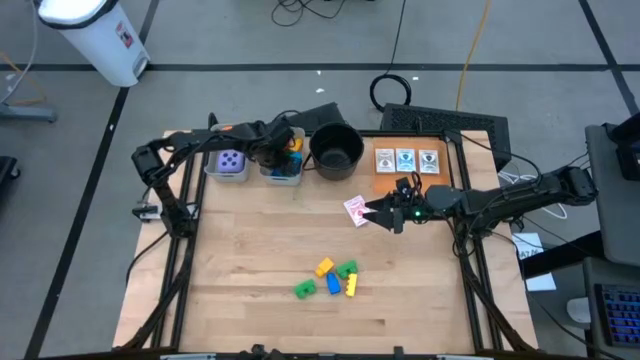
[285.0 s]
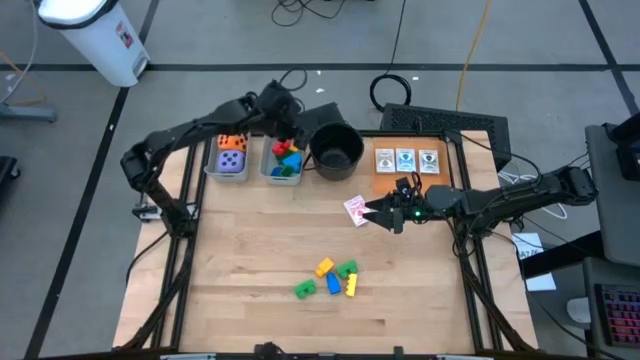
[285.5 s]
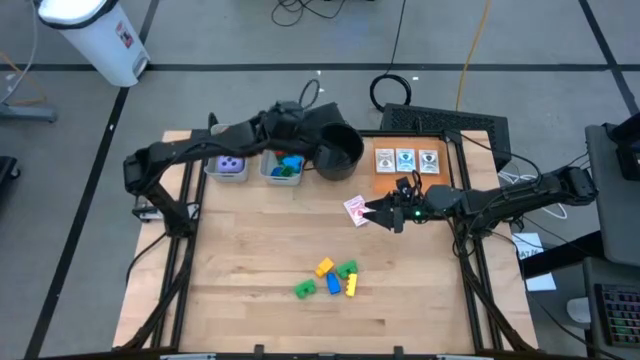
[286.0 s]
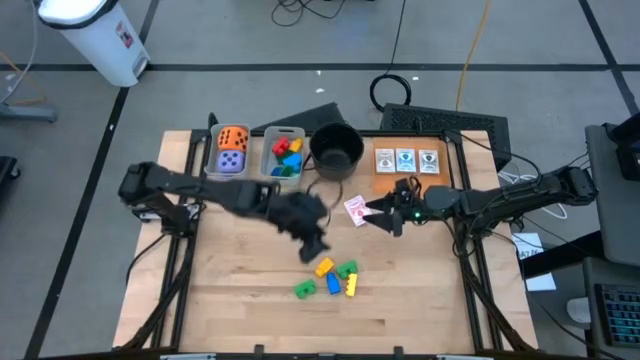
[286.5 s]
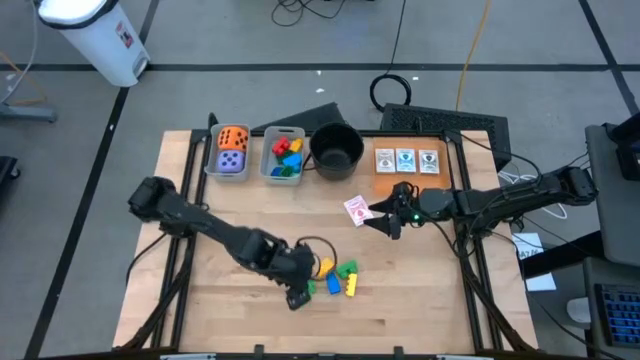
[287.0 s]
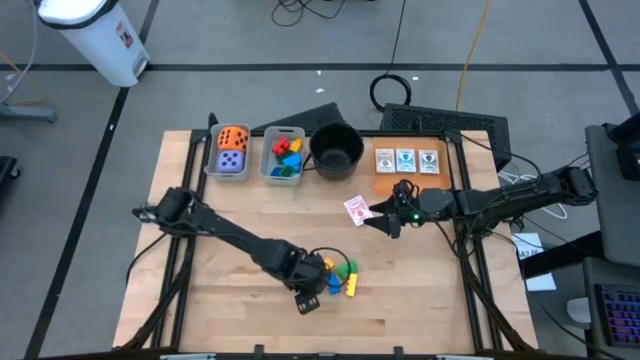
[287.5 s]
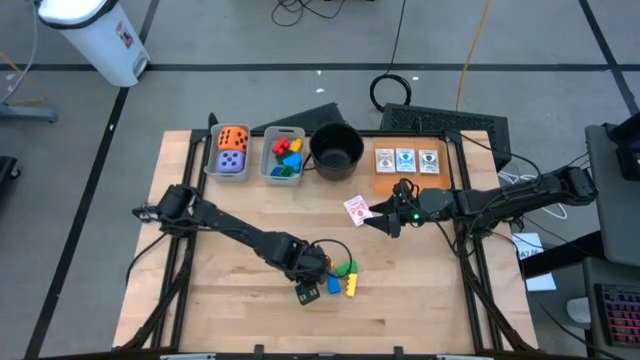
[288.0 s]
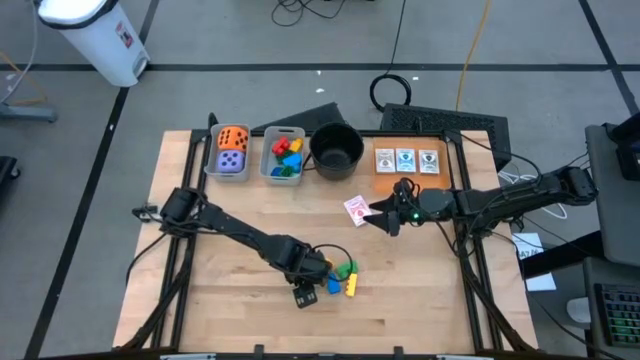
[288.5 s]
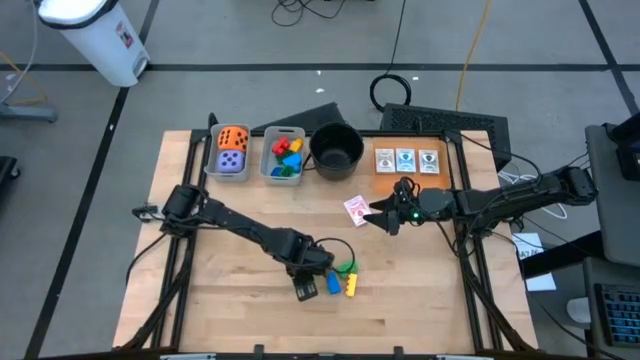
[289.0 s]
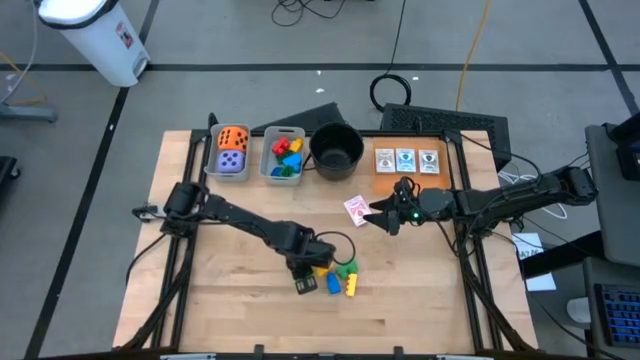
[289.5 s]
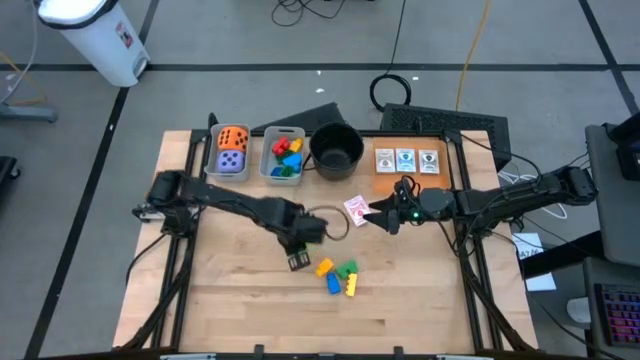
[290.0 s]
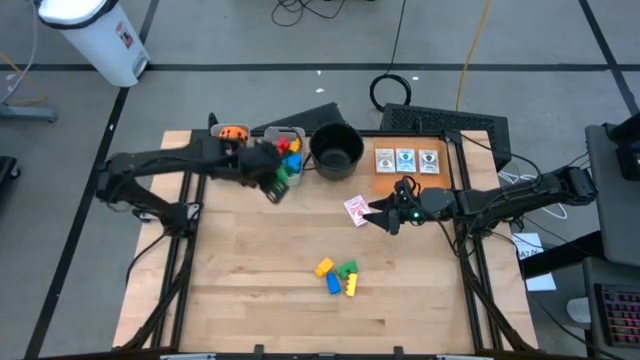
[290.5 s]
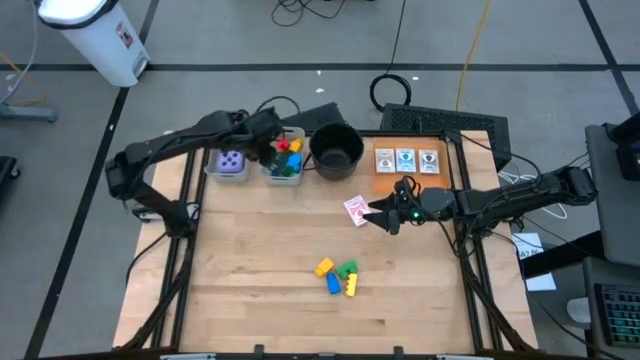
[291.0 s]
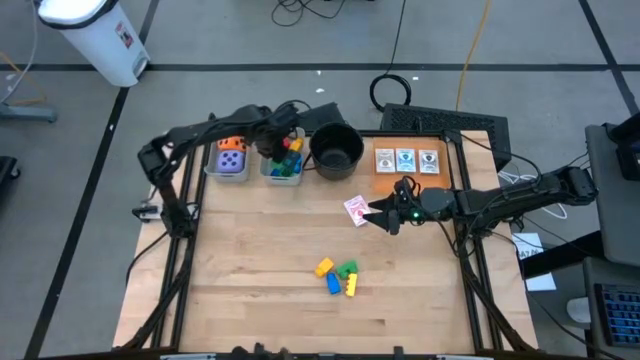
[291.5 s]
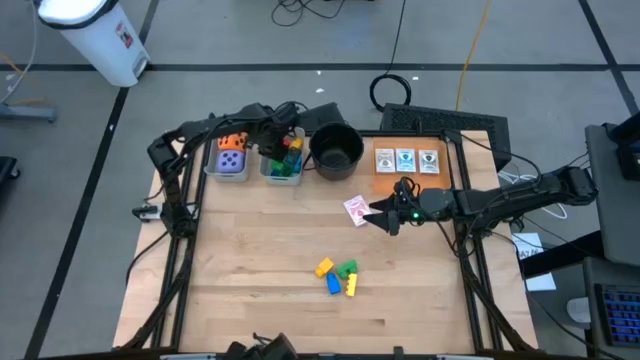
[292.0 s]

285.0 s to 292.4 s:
Task: Pick & Place Toys
Put the green game piece into the right gray bin

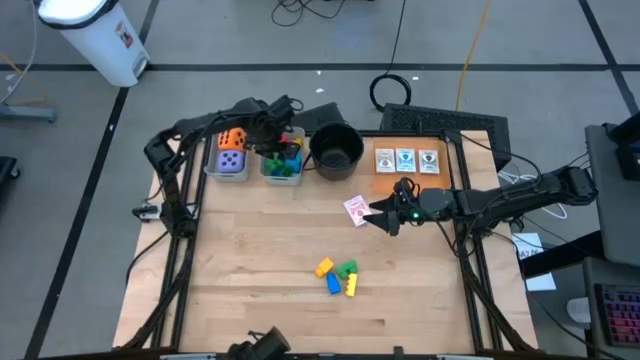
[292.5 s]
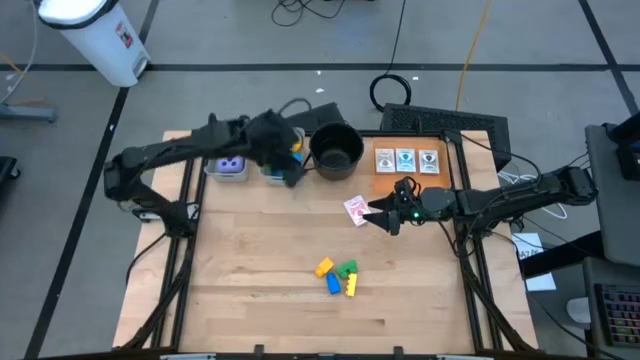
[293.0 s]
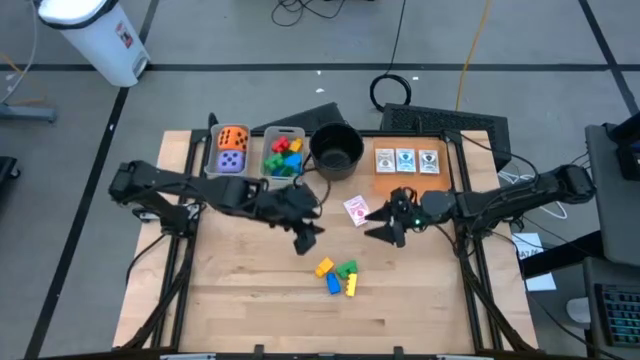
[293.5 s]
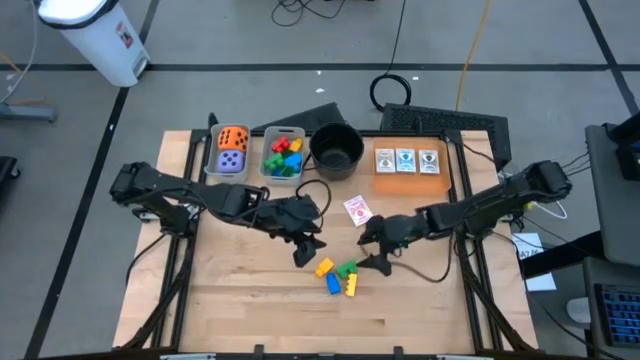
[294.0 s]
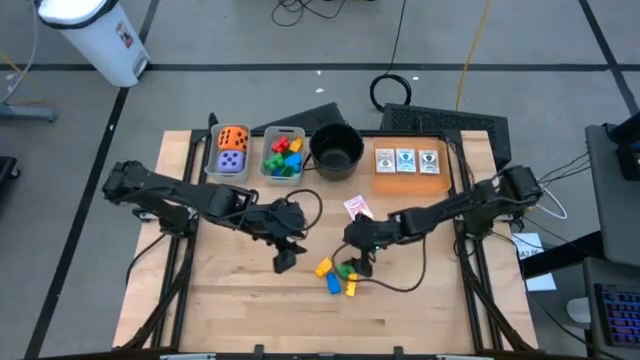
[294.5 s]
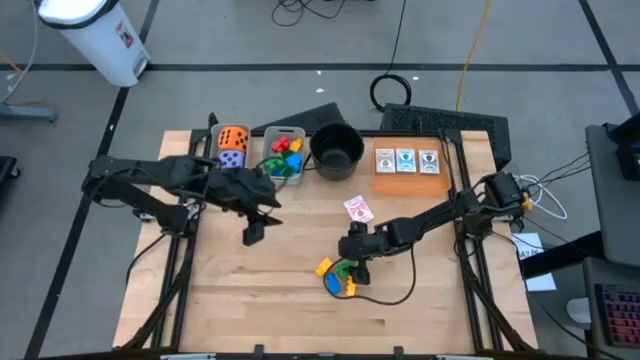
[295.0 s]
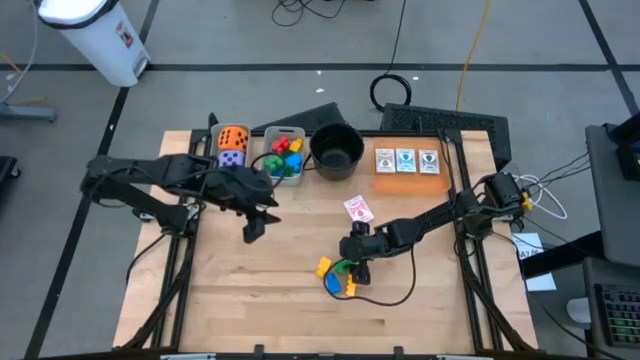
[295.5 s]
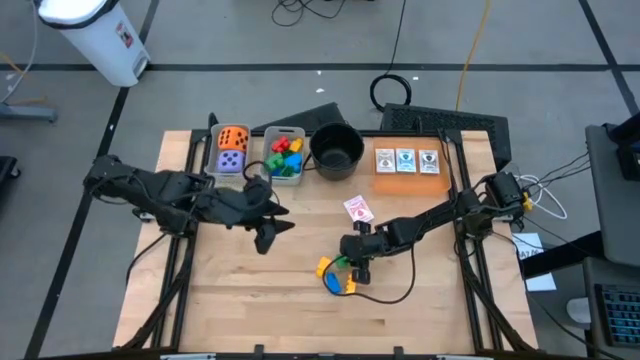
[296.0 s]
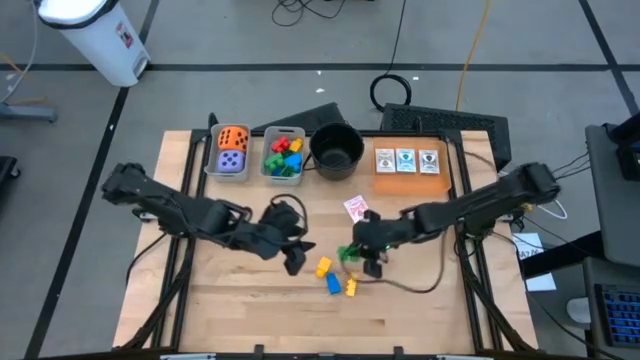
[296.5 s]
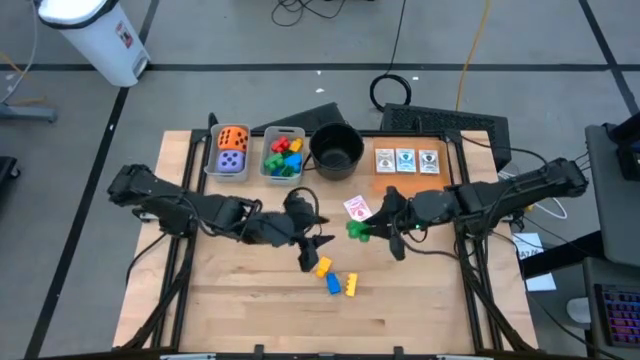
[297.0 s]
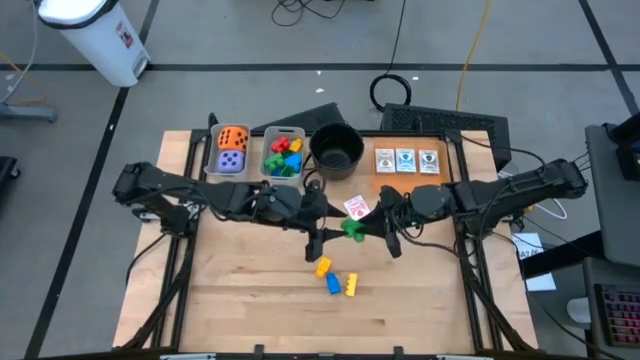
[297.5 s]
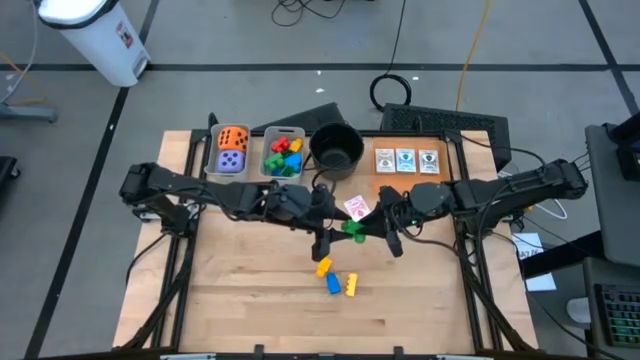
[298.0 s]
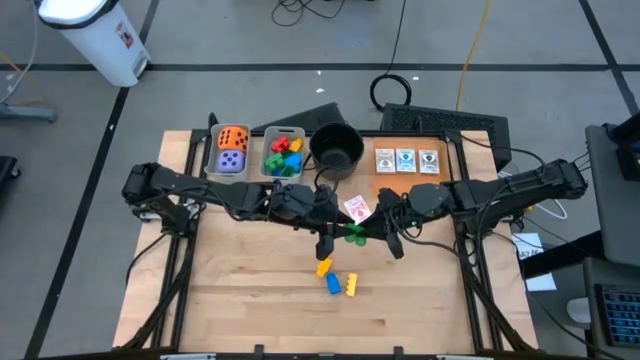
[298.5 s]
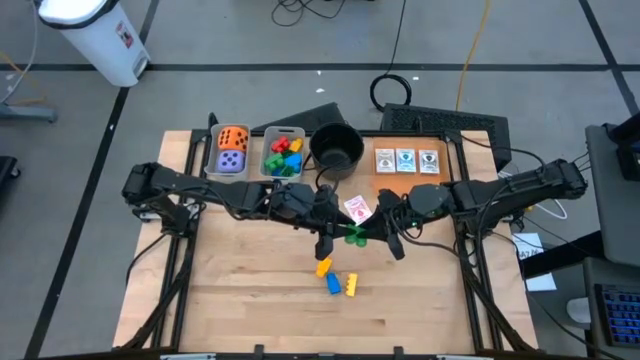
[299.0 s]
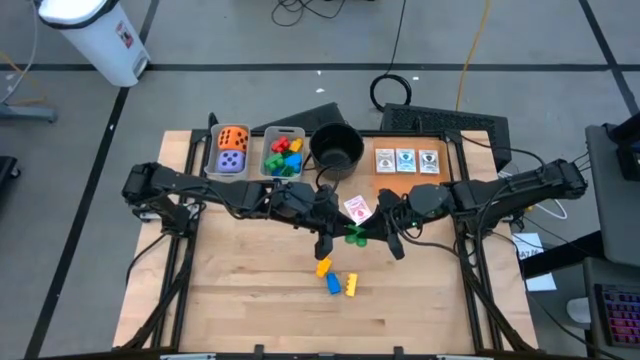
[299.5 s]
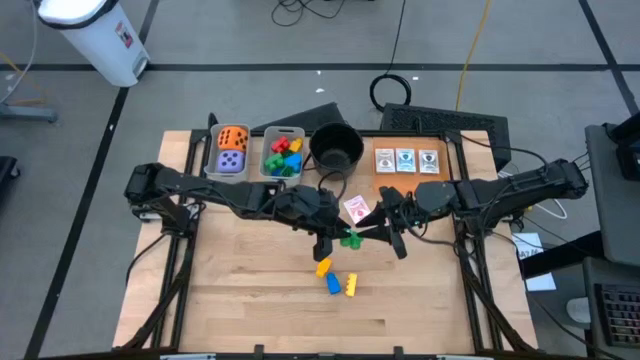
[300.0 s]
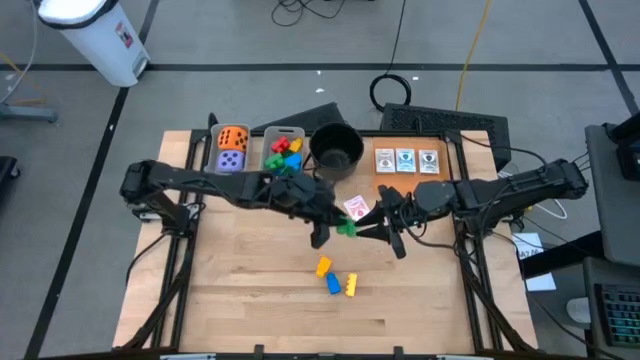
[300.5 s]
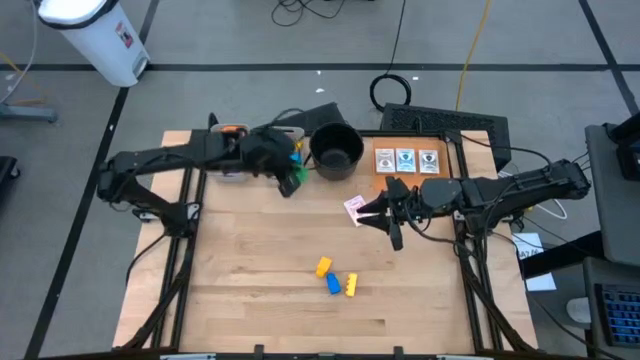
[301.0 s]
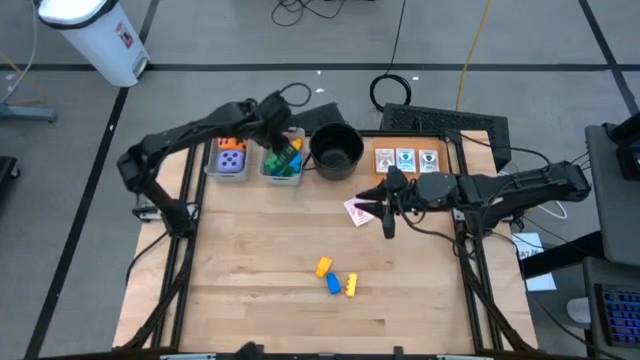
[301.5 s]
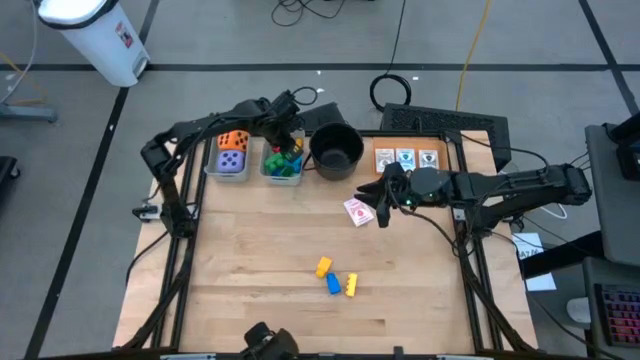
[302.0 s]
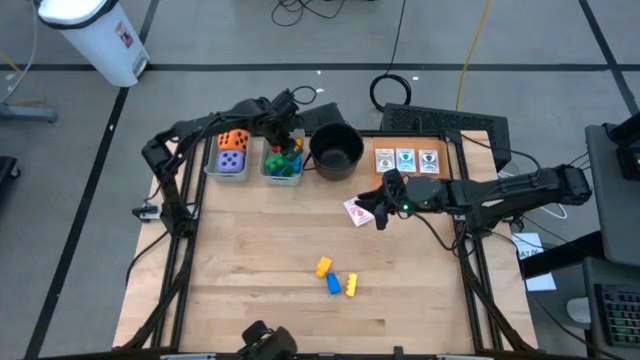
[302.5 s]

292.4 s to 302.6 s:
Put the green game piece into the right gray bin

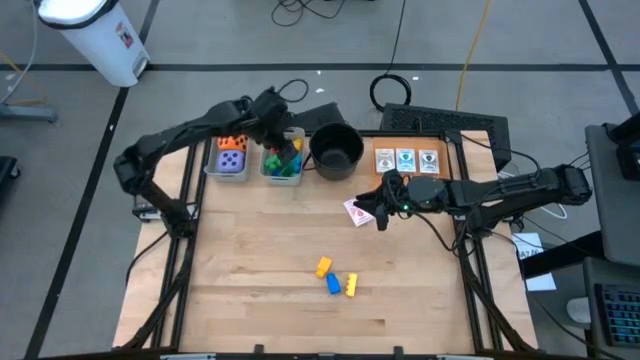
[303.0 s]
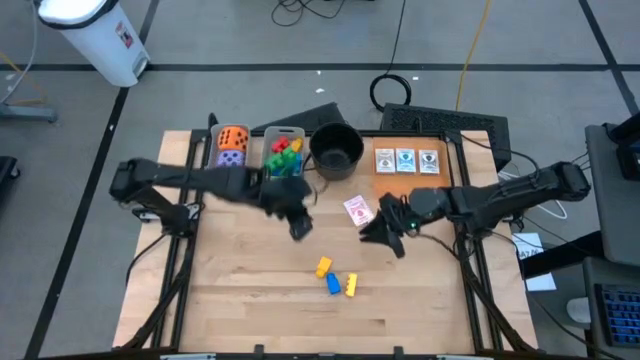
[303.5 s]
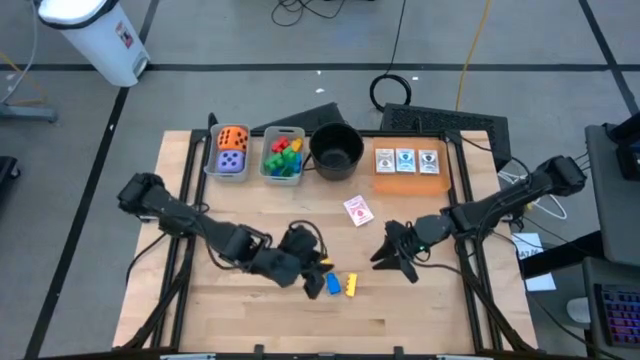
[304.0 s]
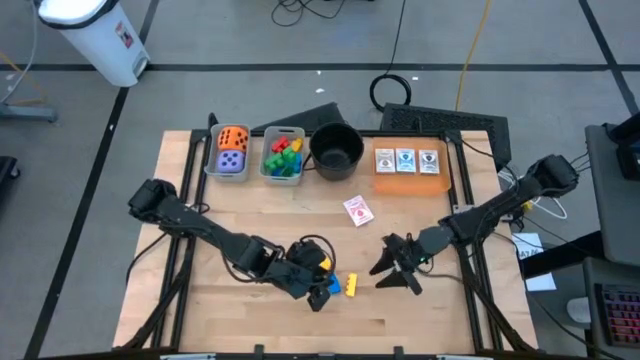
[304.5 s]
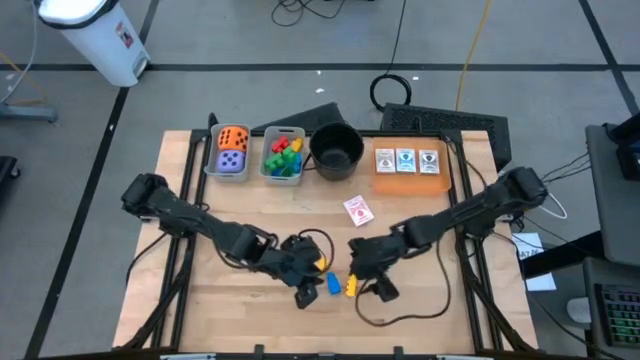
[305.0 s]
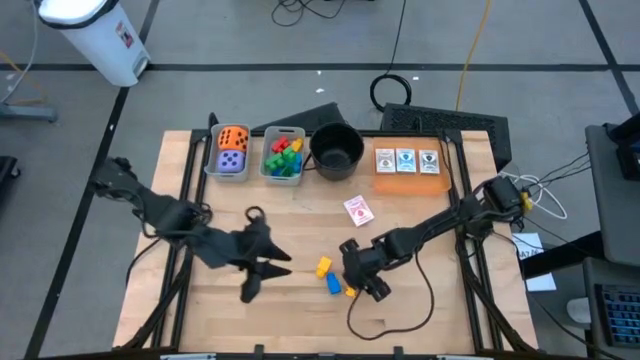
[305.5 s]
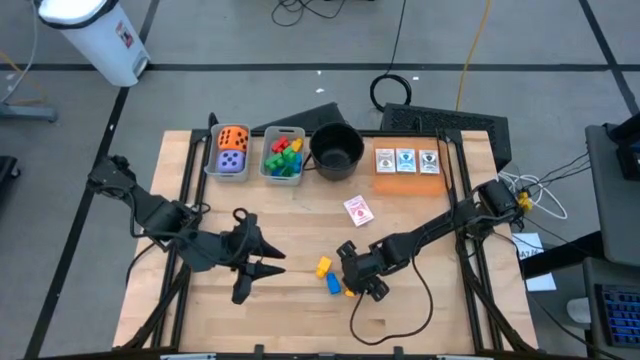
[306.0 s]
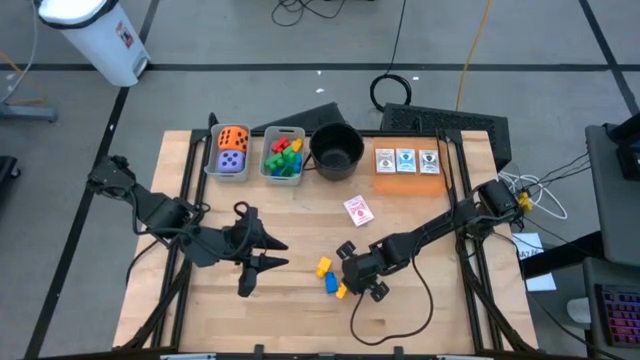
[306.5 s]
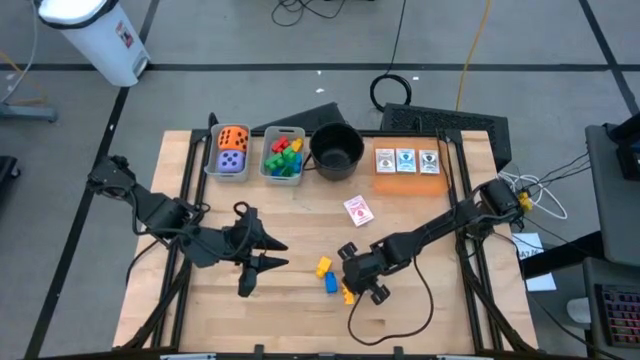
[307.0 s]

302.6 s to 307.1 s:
Put the yellow game piece into the right gray bin
